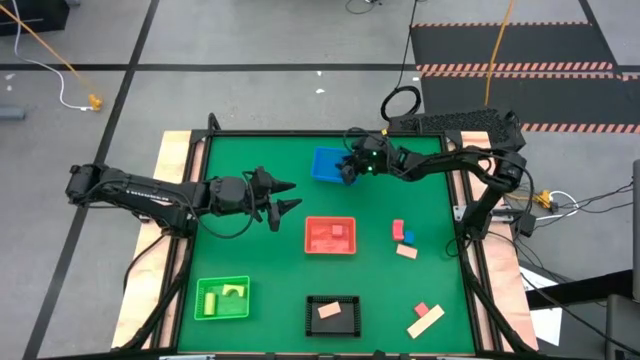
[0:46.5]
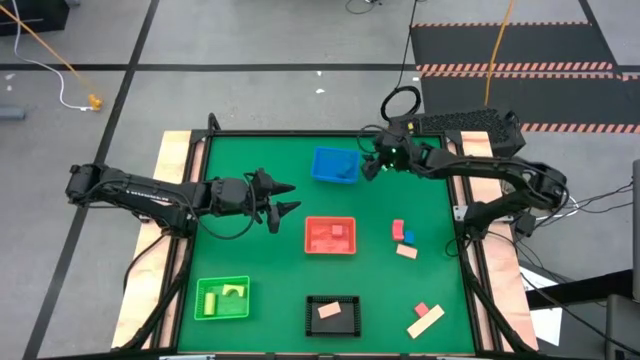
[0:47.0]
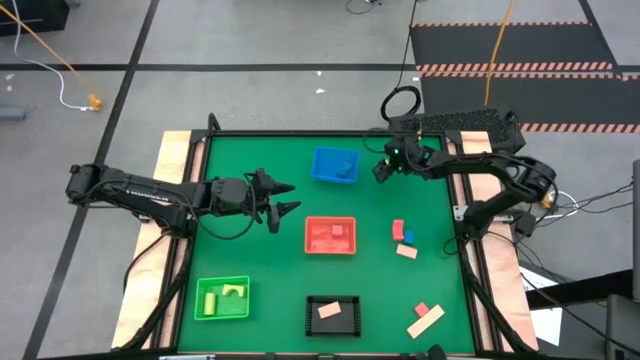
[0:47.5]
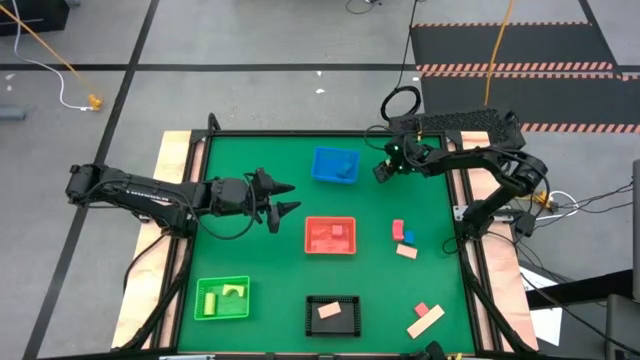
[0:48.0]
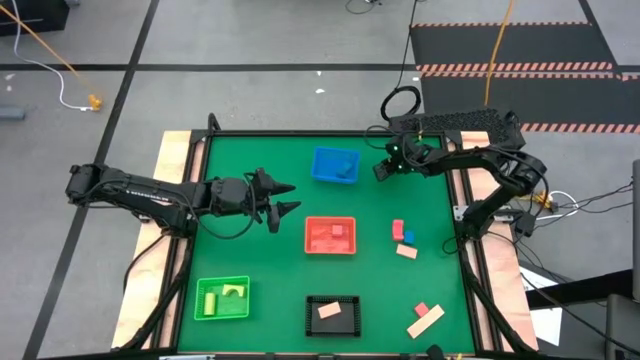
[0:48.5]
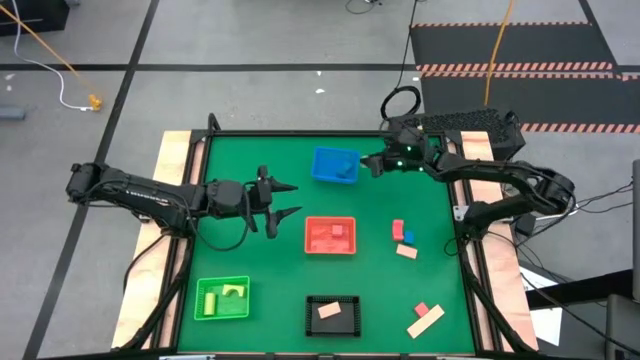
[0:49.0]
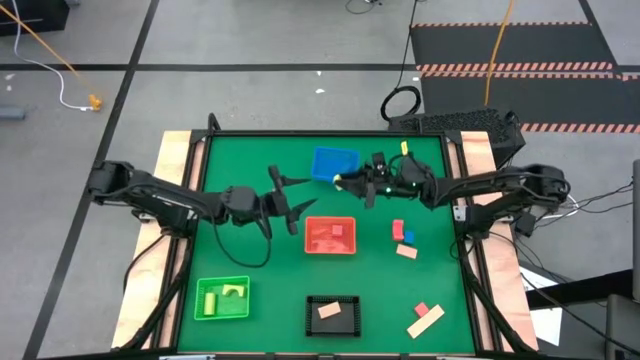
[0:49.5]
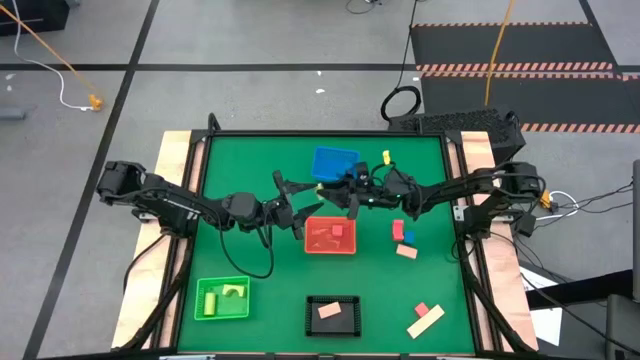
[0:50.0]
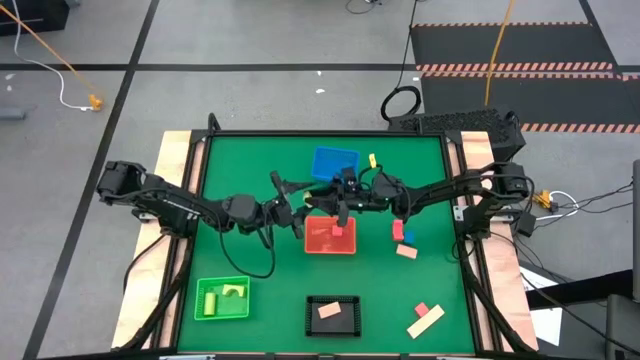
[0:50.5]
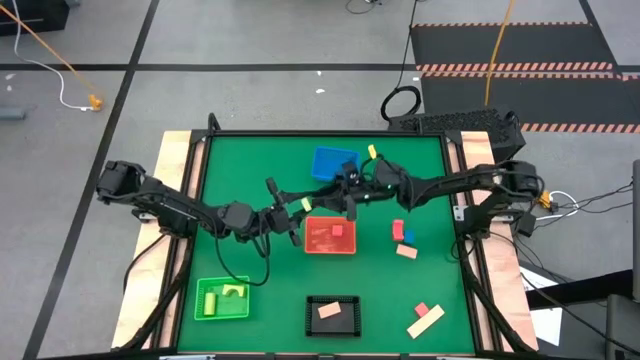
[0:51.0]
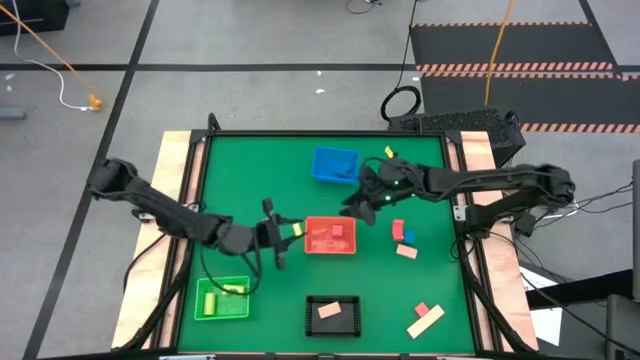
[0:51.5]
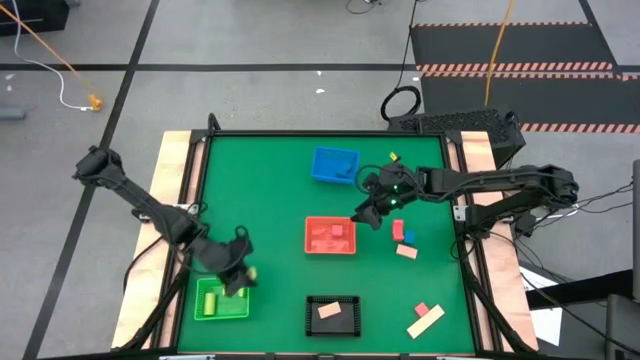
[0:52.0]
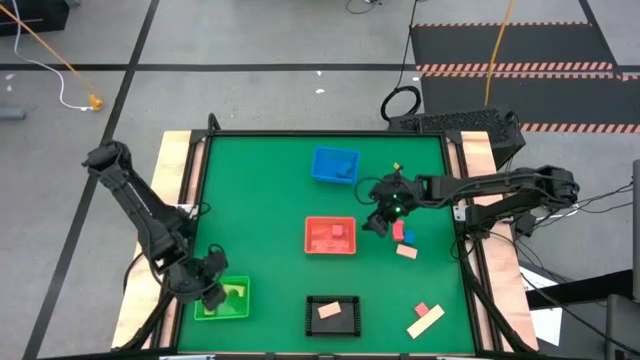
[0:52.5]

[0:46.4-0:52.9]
Task: Sort & place blocks by color
Put the green block into the green bin

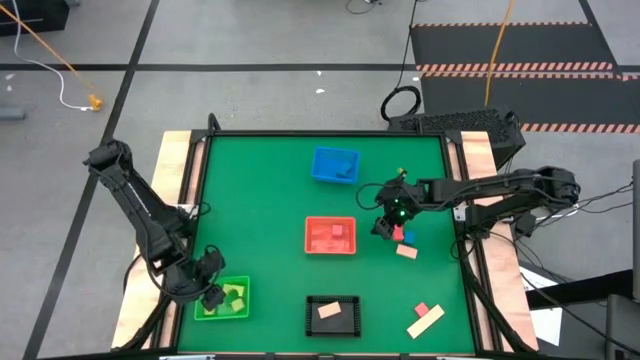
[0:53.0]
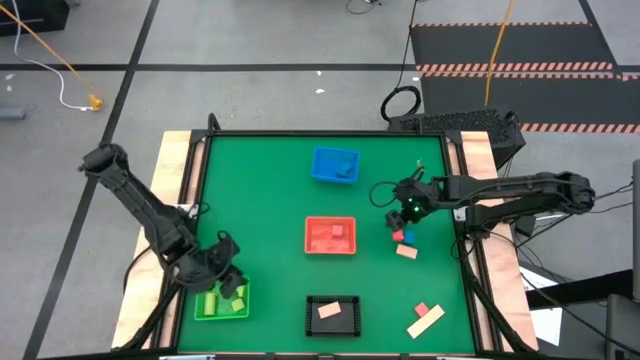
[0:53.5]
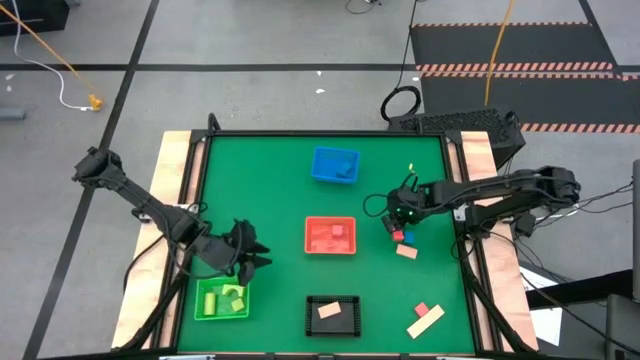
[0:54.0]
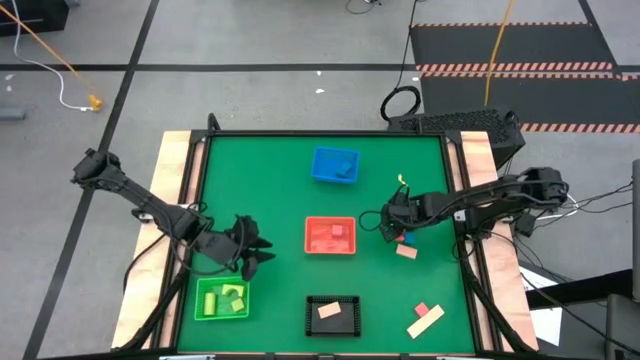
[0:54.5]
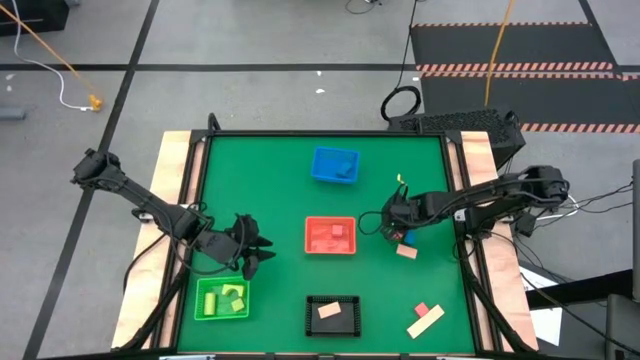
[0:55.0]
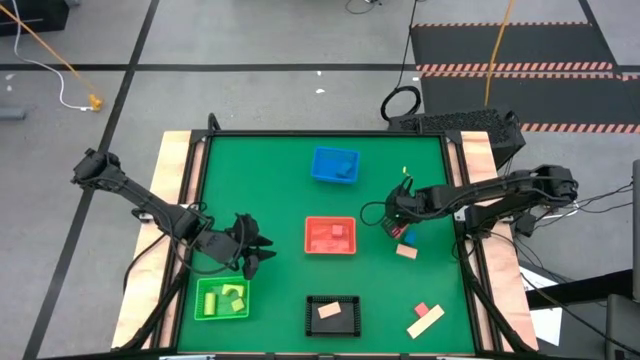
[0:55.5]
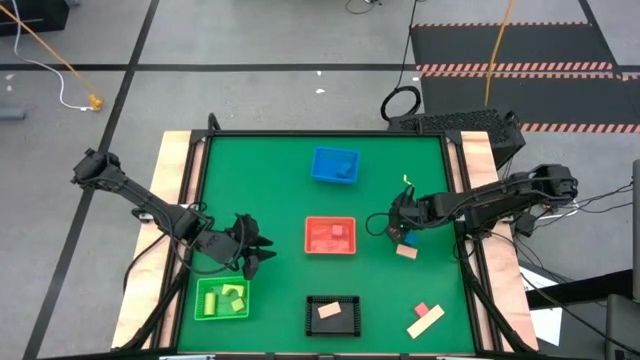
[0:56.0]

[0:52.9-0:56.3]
Put the top orange block into the orange bin

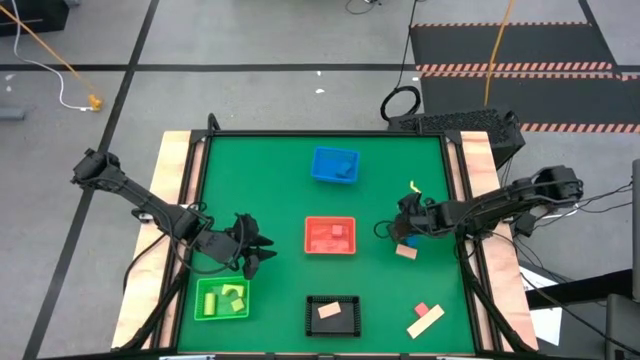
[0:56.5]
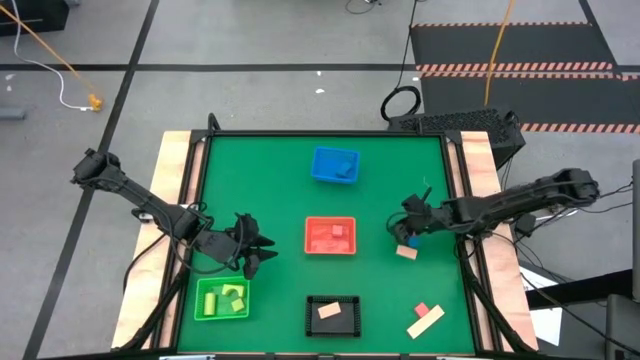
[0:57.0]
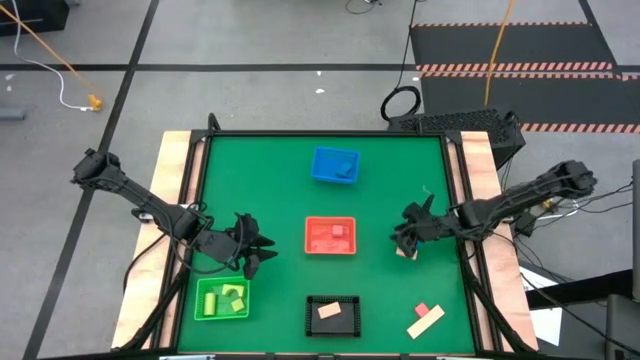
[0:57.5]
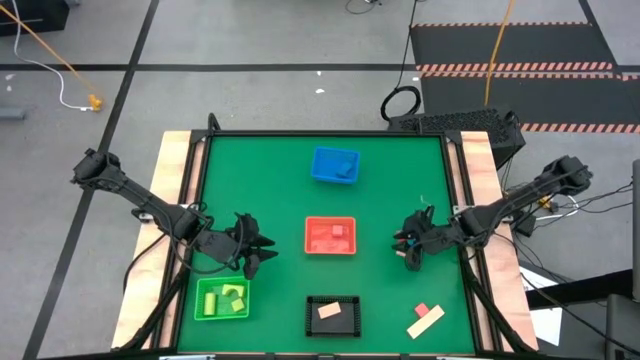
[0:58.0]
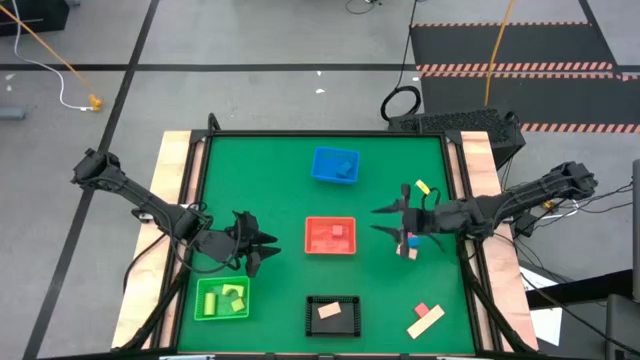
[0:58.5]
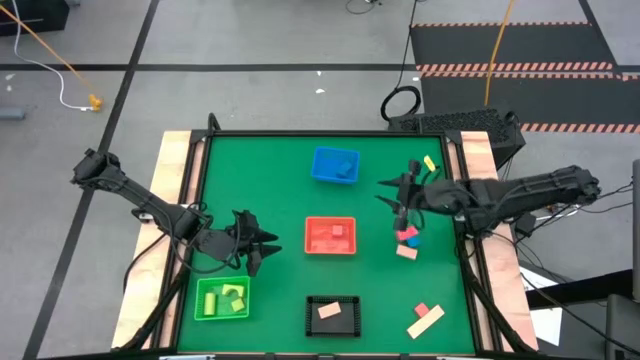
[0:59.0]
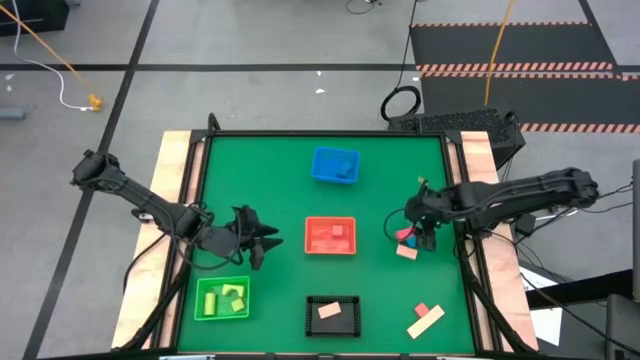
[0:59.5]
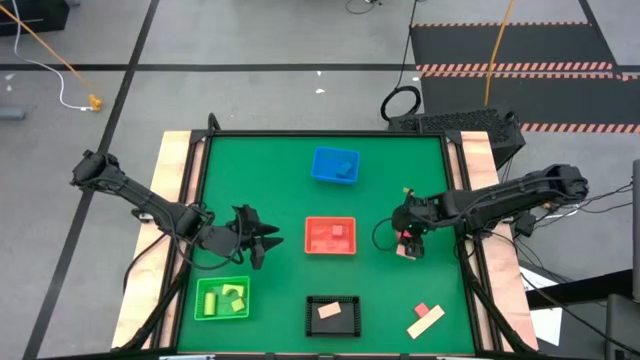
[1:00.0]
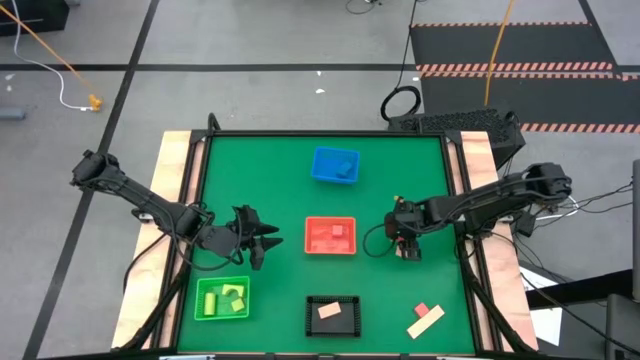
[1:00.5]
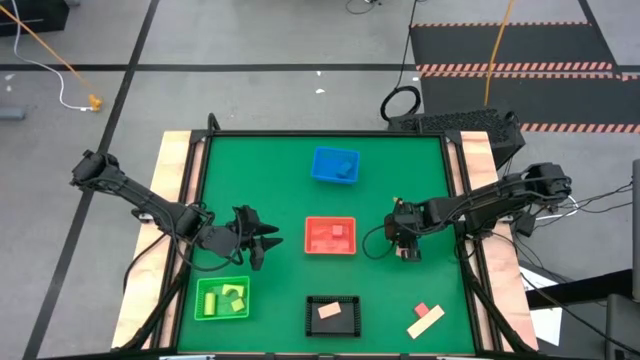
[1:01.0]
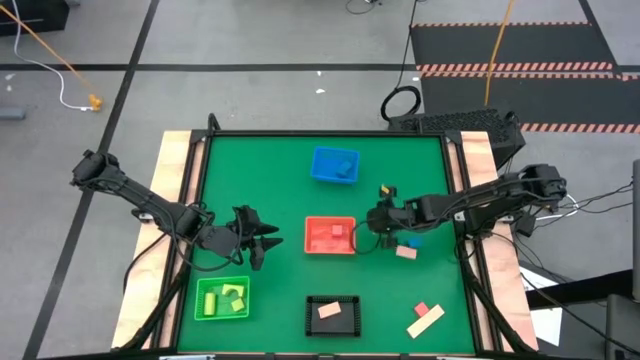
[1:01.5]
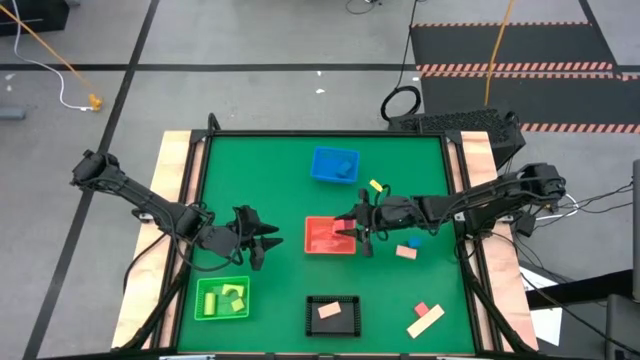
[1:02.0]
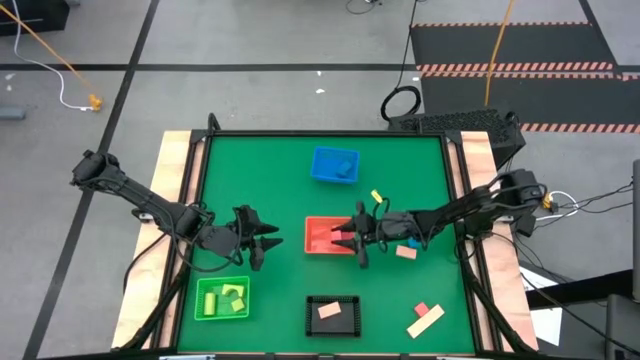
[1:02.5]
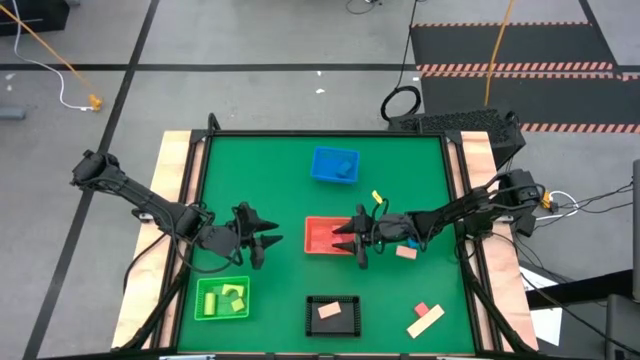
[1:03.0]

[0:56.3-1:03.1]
Put the top orange block into the orange bin

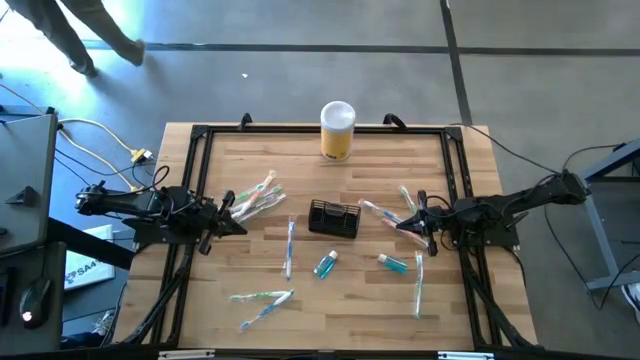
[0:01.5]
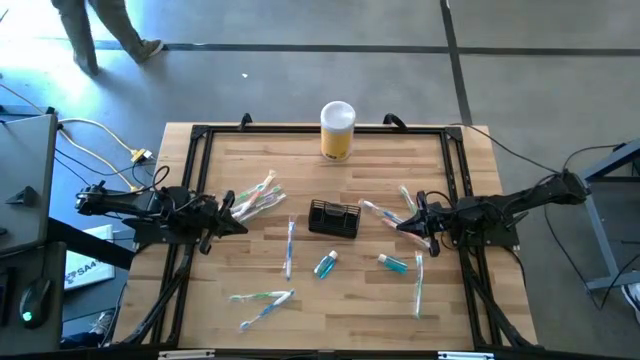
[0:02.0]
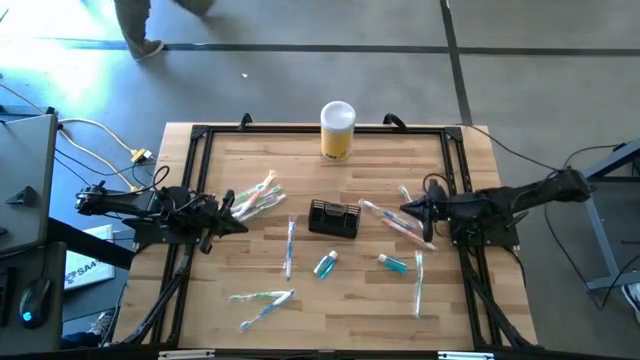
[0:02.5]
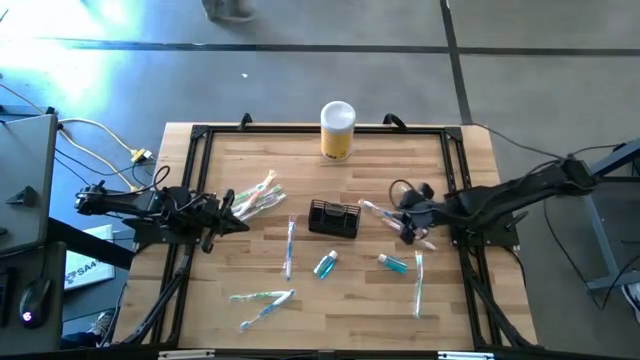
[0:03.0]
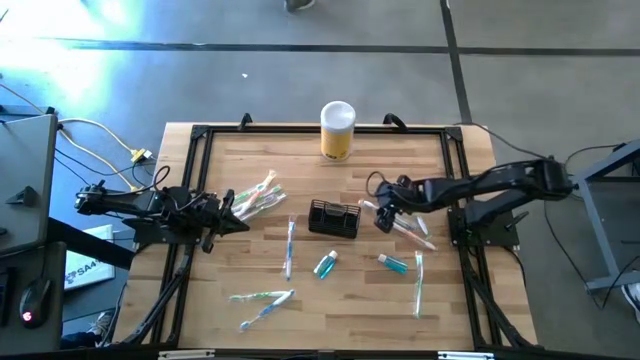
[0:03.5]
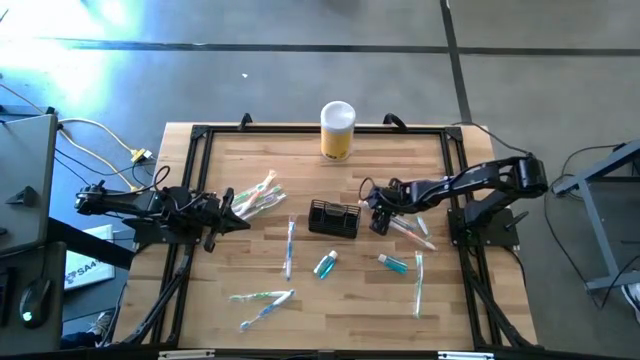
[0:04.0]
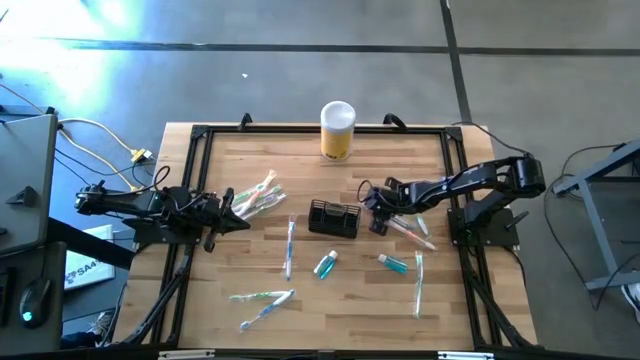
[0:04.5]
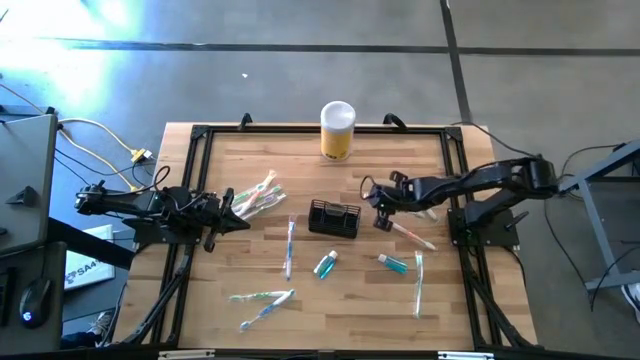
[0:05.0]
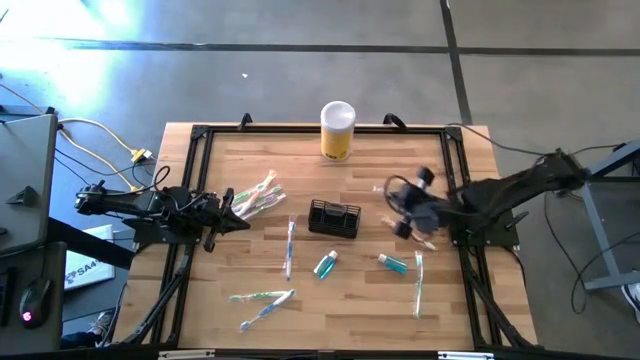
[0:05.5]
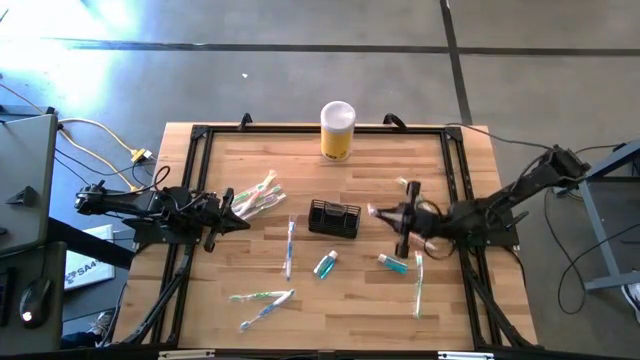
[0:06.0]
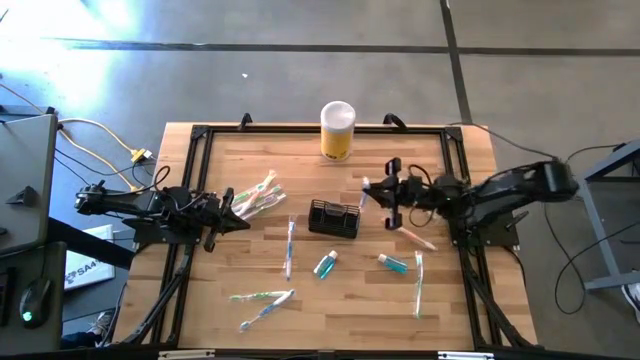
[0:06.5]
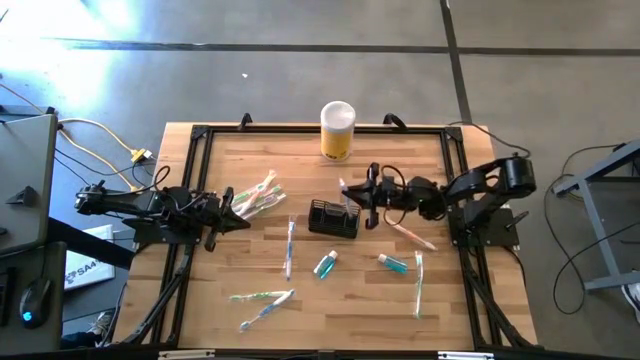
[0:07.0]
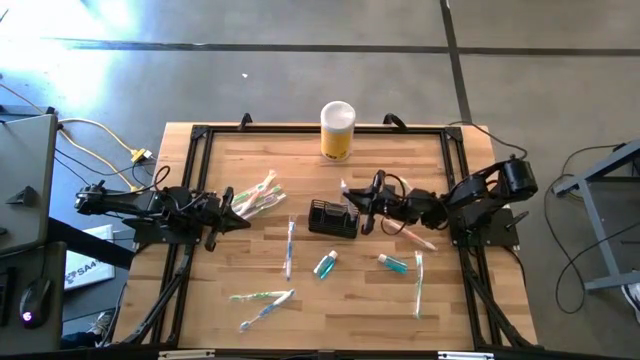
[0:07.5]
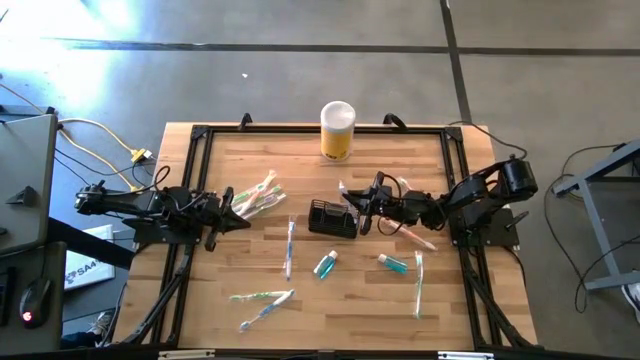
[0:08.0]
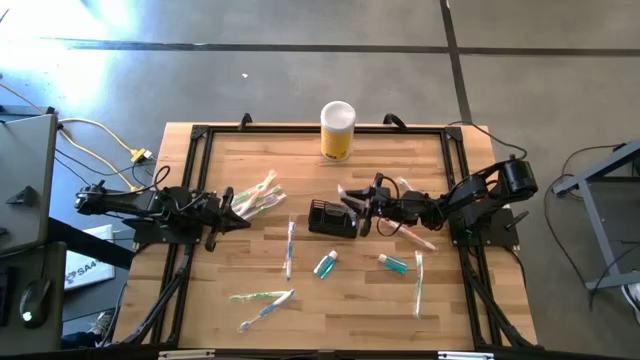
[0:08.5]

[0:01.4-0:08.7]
Task: Pick & Place toothbrushing station
Put the top blue toothbrush into the wire organizer
